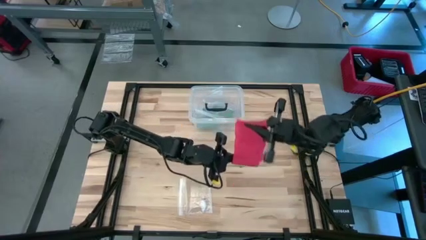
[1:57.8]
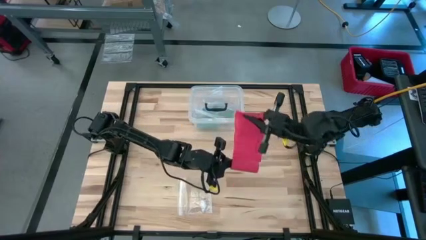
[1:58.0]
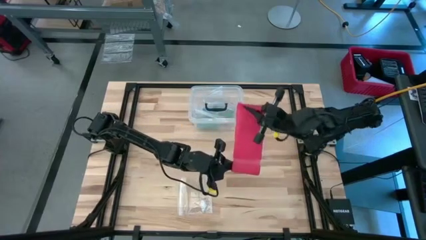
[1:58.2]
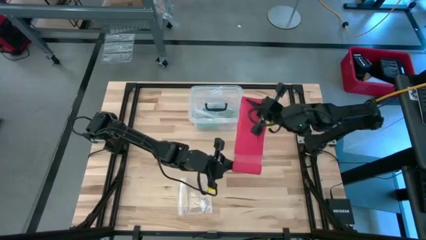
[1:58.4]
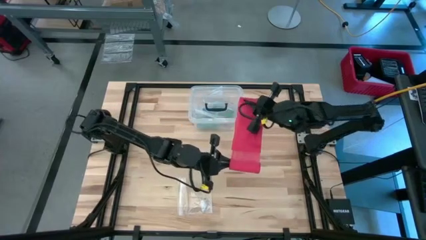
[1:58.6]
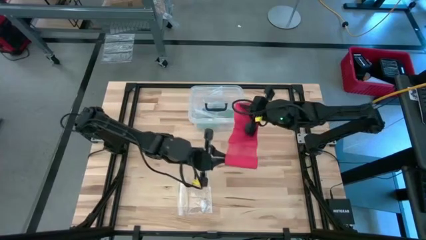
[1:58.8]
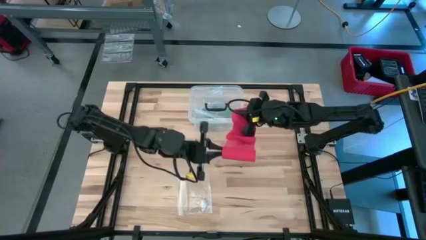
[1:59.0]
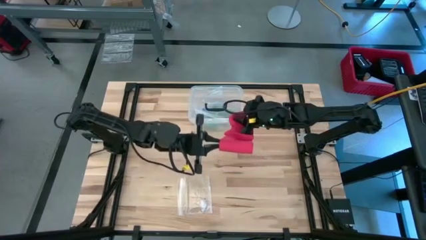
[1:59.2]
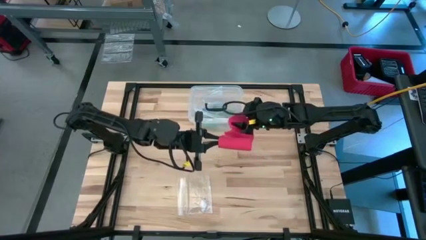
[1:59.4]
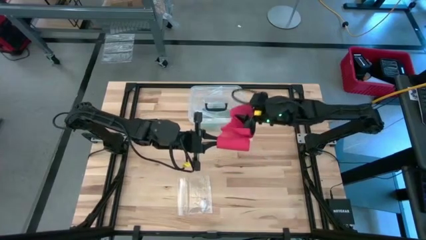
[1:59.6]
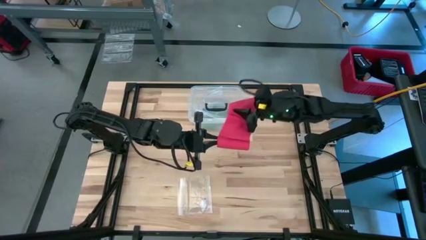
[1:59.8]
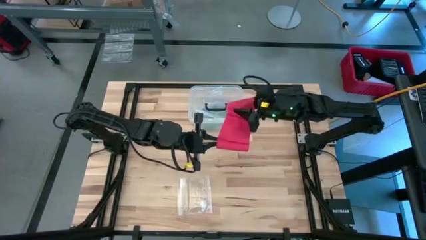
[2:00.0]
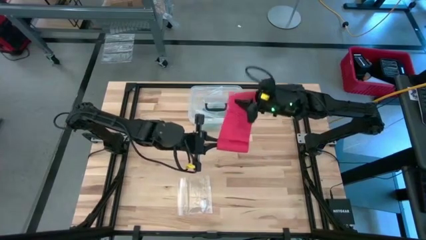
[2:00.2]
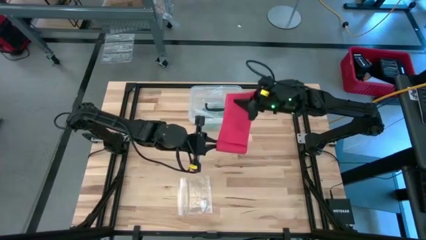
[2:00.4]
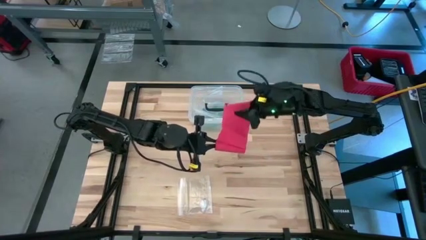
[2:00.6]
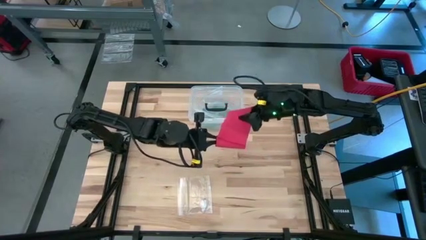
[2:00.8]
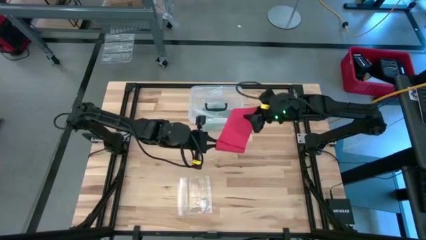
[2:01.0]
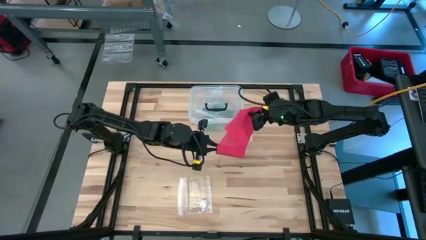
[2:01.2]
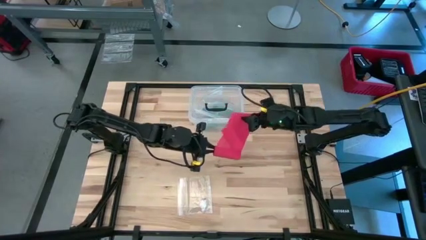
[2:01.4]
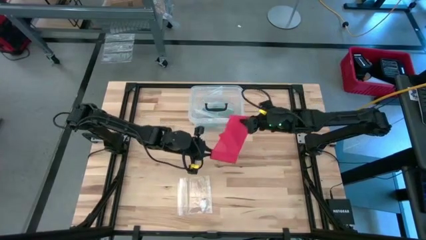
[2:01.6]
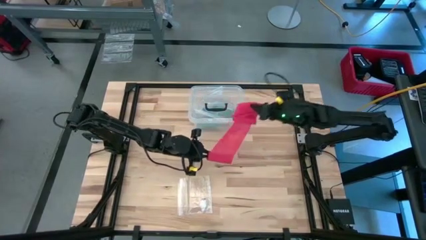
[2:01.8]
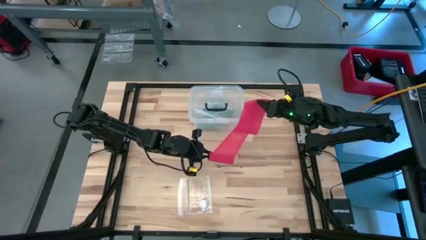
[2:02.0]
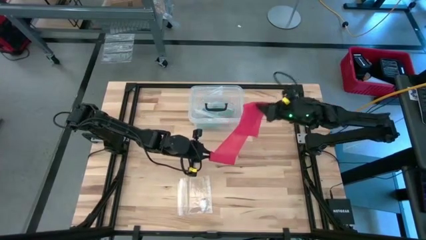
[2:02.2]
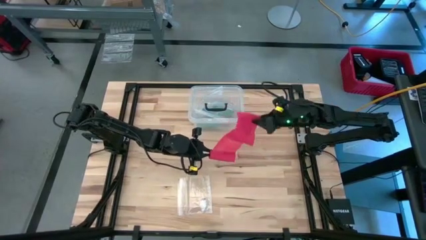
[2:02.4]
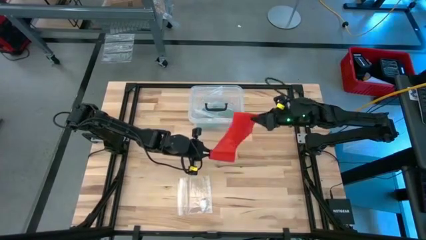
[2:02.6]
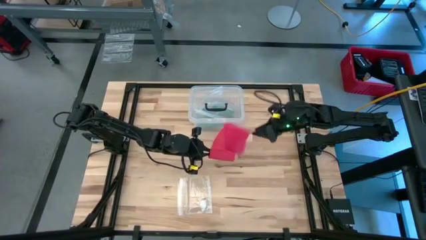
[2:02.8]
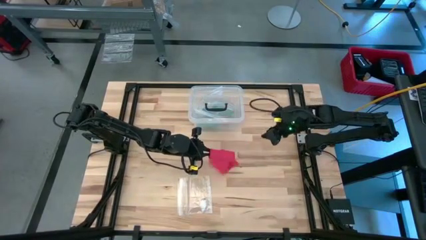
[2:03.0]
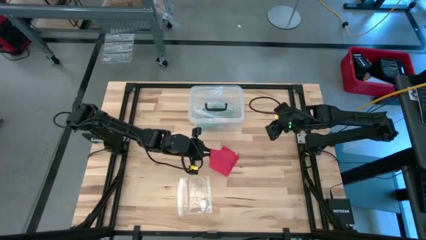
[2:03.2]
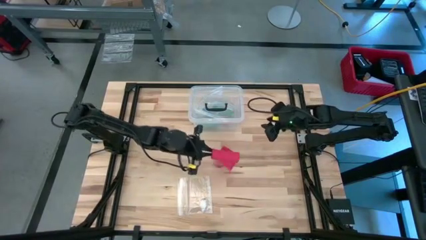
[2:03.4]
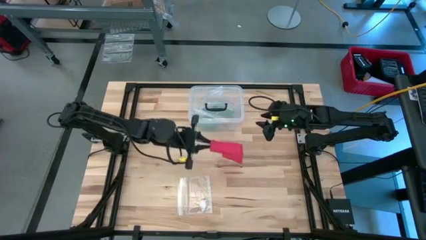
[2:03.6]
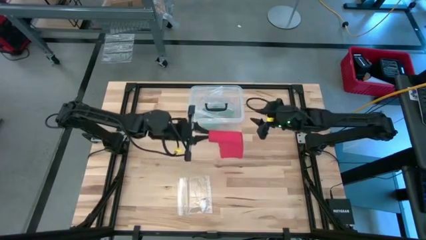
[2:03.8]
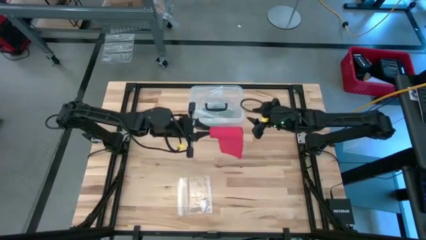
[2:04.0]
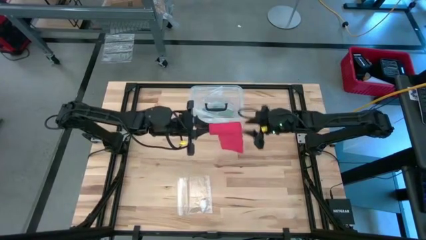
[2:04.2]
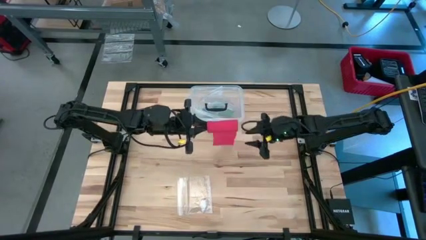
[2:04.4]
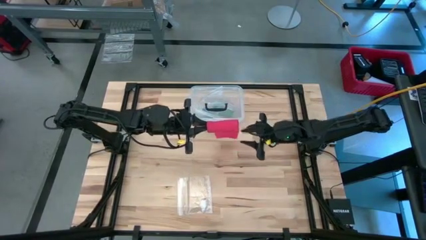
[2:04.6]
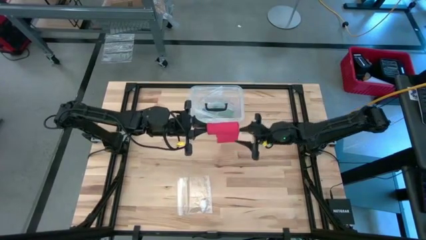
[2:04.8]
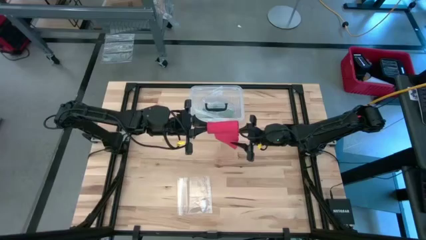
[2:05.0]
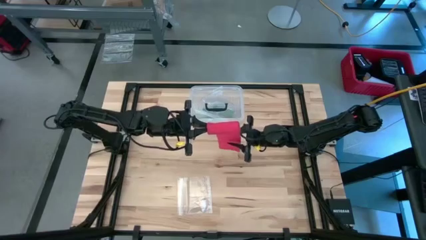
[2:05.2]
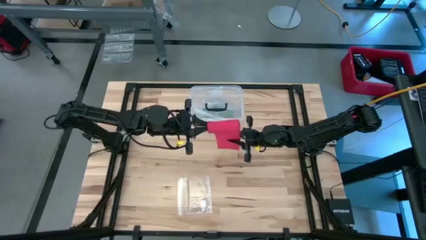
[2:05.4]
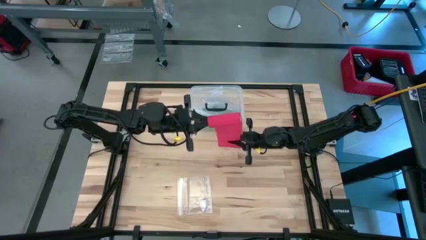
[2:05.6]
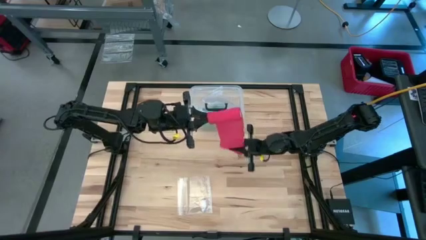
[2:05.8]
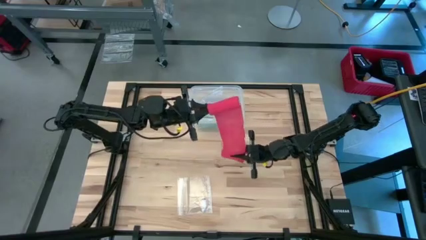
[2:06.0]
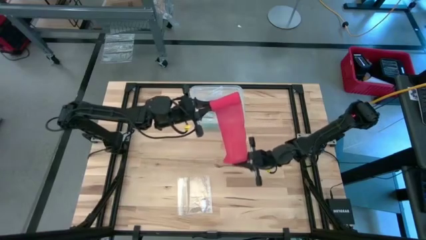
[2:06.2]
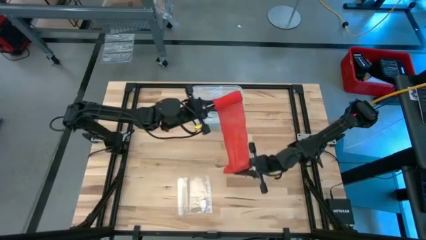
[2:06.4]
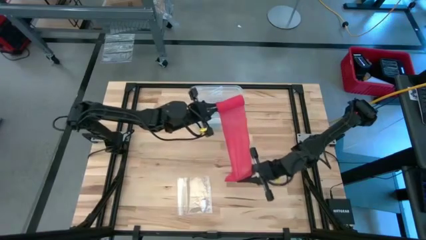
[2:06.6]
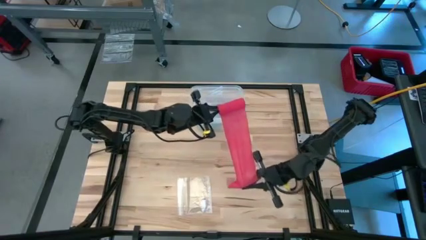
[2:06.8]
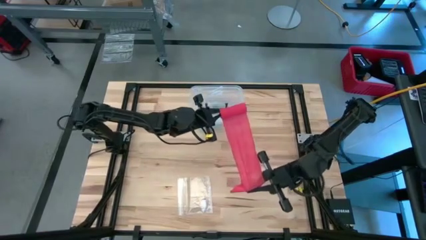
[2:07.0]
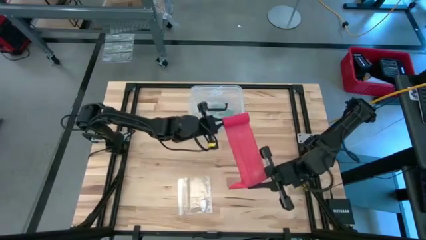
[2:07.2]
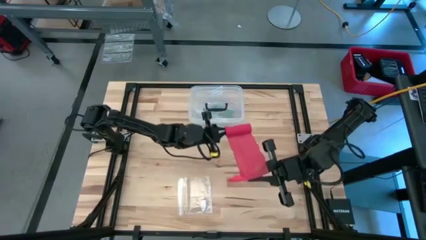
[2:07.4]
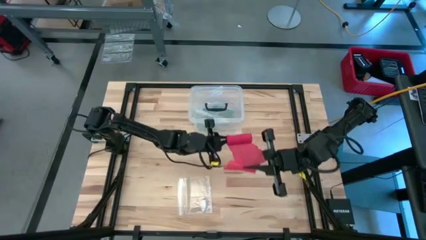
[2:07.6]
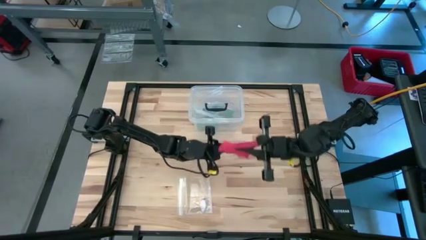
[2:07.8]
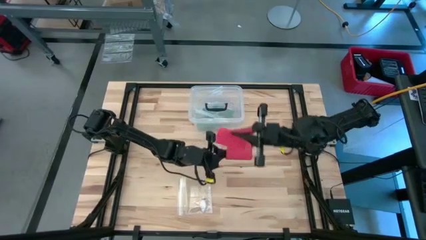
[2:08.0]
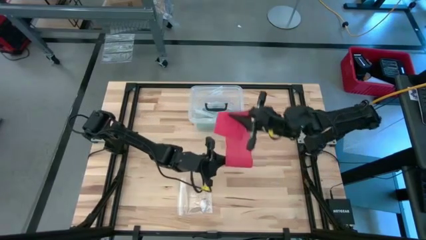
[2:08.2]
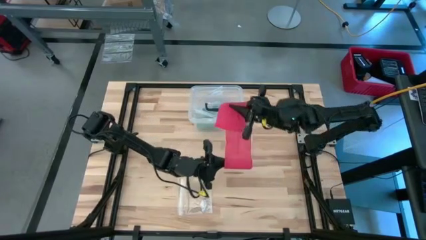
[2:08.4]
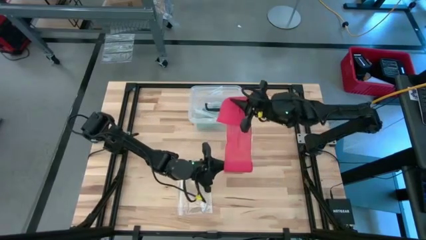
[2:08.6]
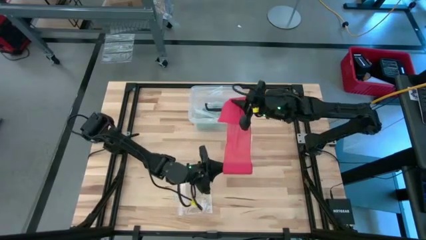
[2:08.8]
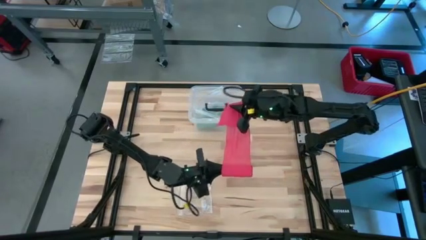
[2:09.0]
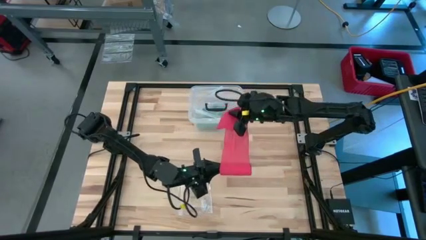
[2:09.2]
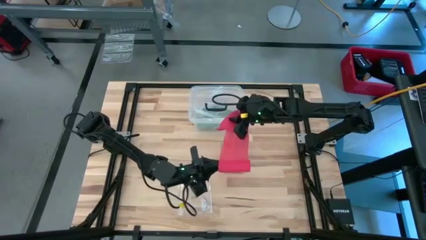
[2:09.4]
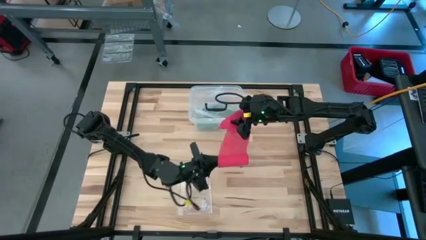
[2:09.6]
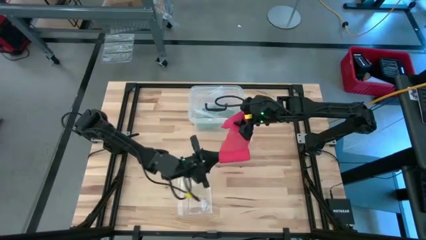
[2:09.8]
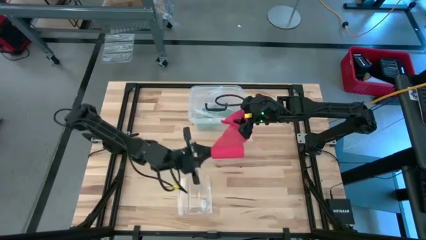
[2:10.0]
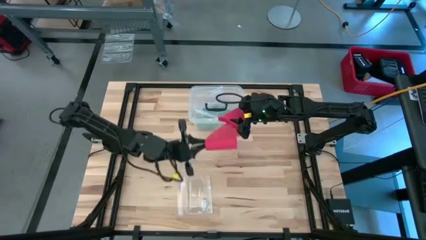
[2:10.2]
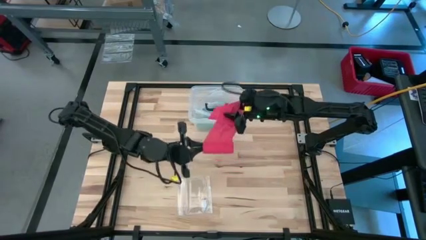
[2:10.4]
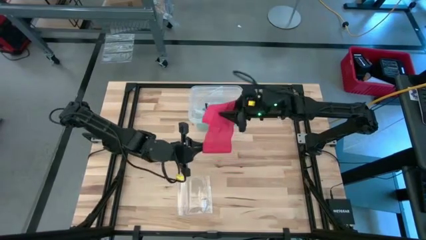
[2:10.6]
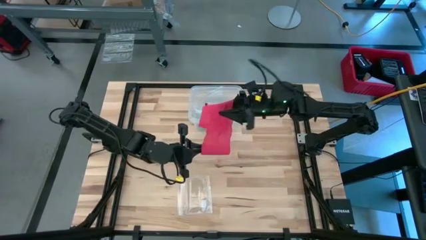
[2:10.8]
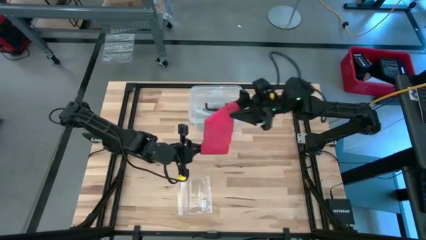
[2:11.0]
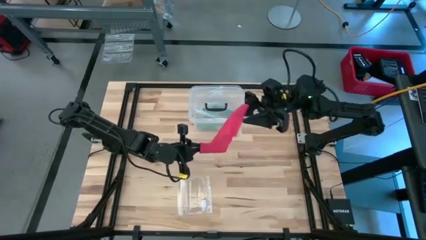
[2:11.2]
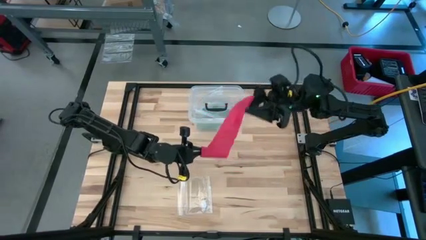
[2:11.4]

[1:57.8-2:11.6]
Task: Roll bandage
Roll the red bandage

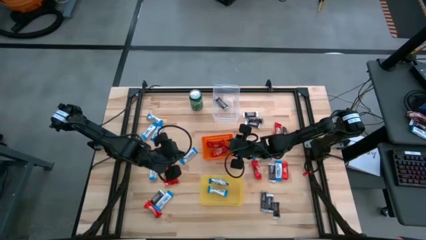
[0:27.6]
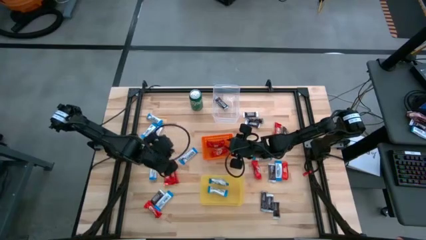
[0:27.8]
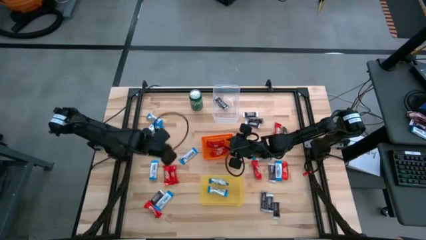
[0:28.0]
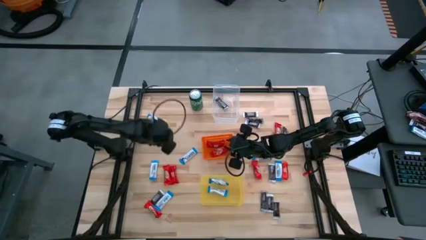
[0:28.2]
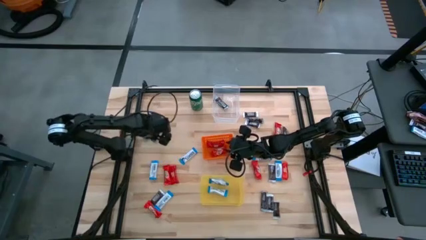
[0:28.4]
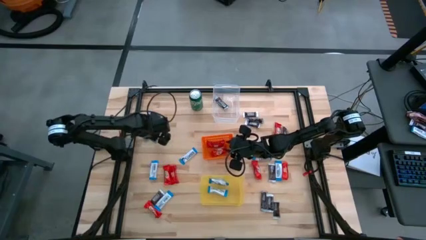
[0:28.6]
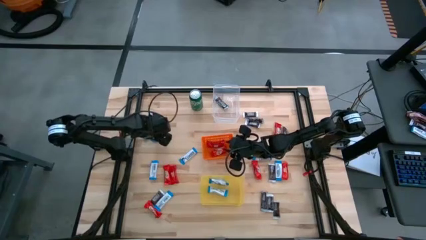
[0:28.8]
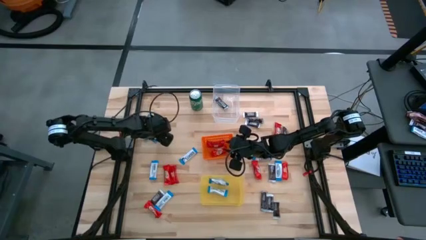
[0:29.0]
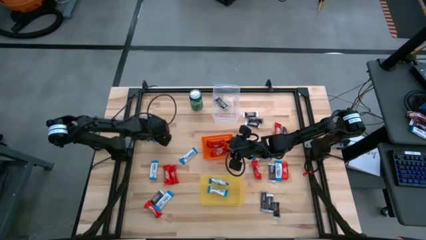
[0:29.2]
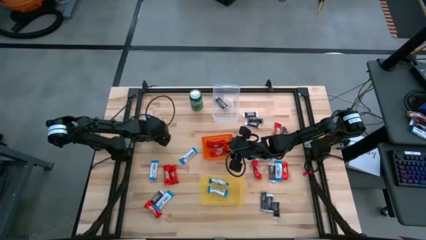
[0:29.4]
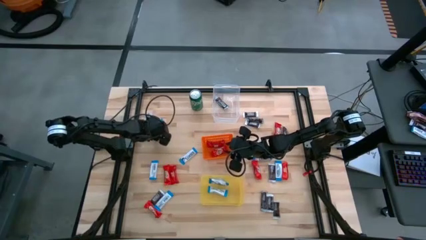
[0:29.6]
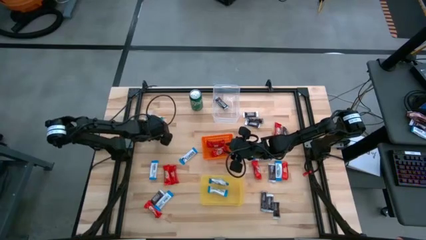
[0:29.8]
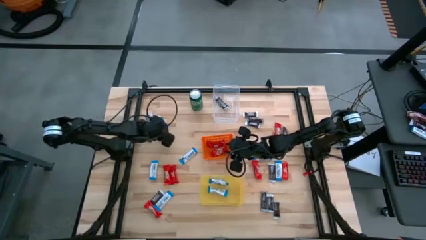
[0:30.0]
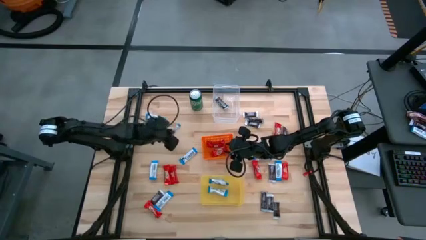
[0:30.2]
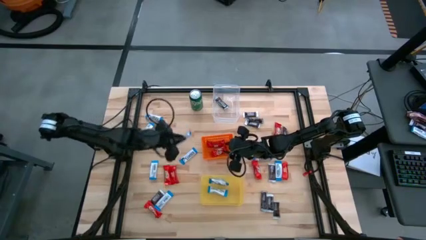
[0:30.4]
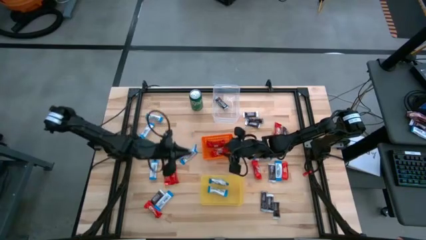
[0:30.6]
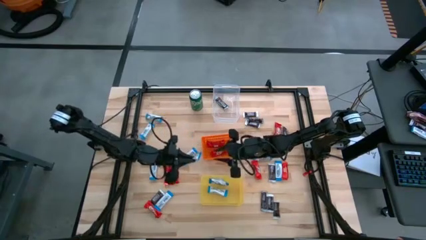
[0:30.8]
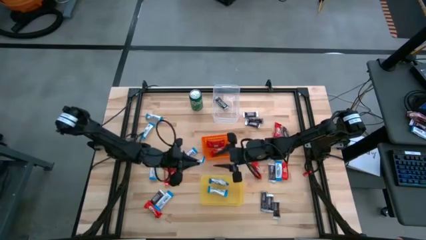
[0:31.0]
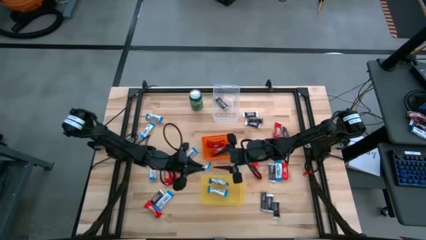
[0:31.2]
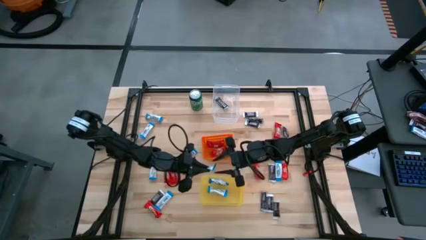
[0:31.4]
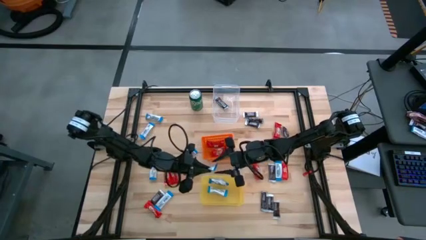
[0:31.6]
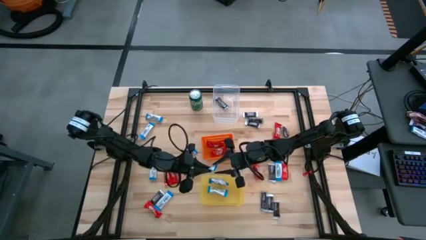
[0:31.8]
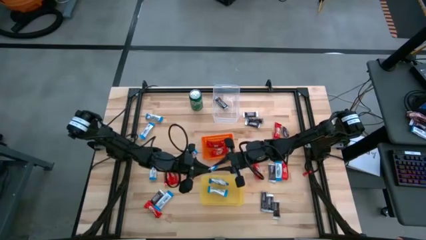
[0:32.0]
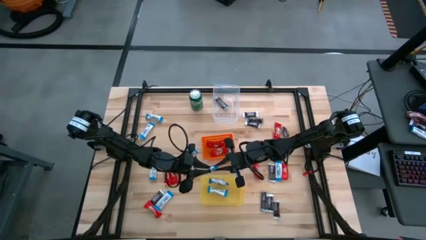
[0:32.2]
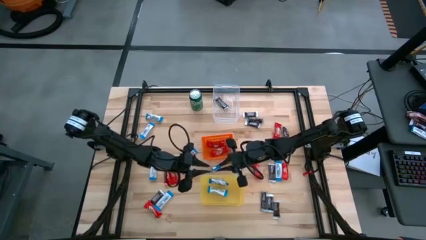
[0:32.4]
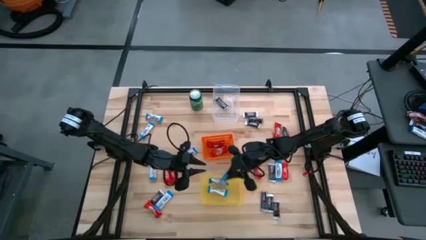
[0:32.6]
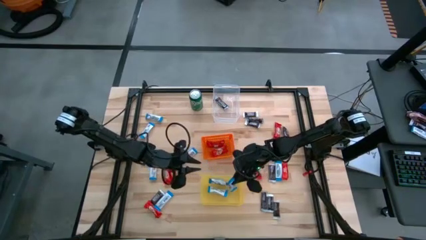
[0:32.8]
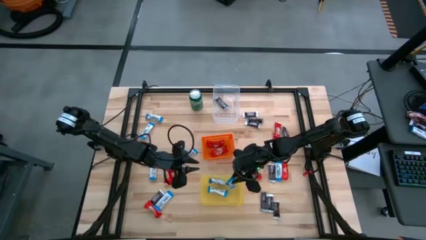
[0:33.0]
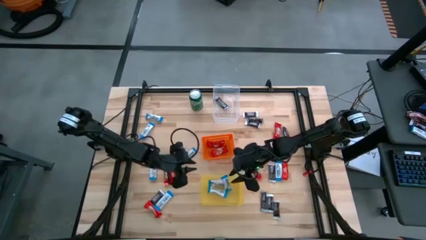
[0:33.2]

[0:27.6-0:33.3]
Task: Sort candy
Put the white candy into the yellow bin
